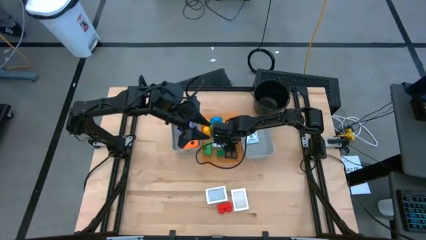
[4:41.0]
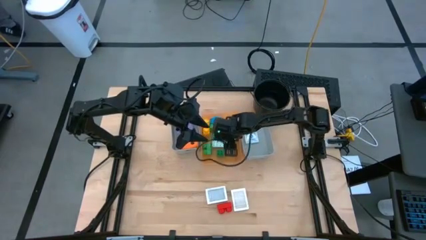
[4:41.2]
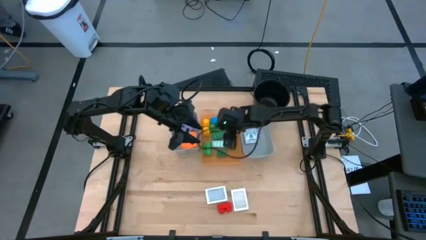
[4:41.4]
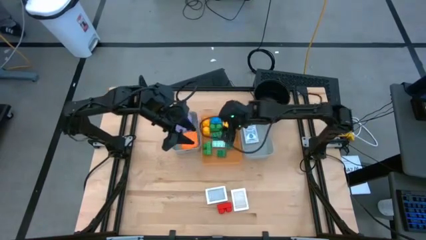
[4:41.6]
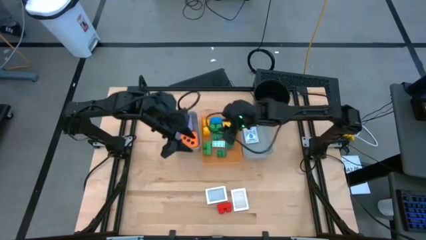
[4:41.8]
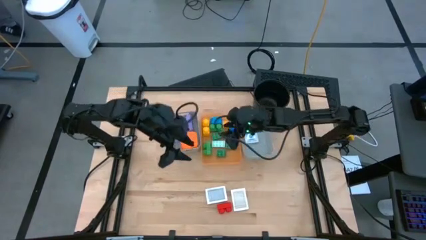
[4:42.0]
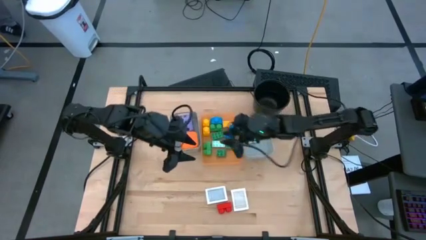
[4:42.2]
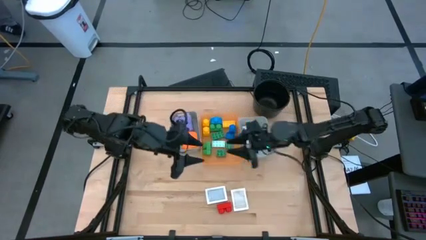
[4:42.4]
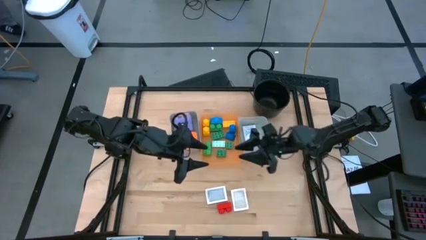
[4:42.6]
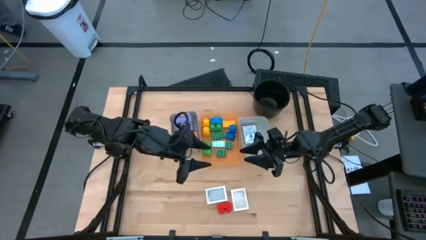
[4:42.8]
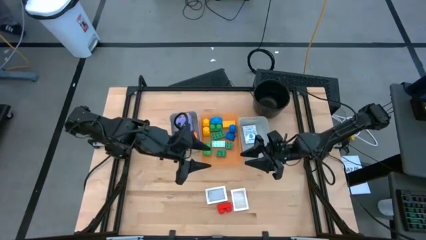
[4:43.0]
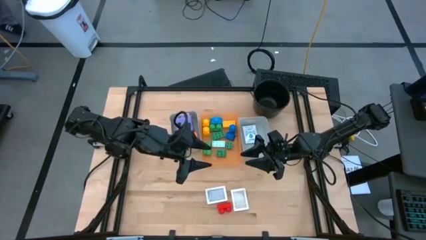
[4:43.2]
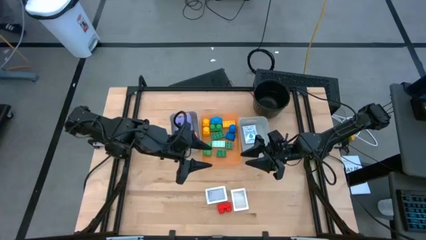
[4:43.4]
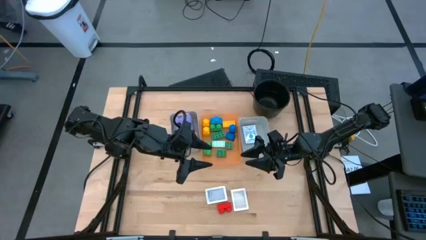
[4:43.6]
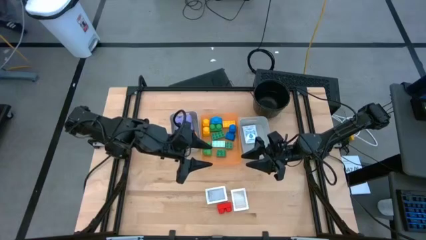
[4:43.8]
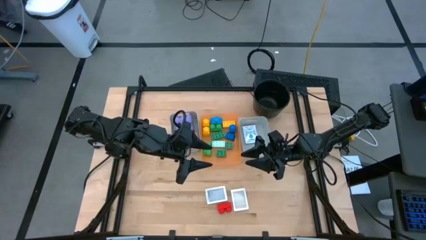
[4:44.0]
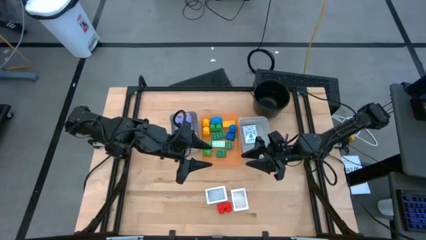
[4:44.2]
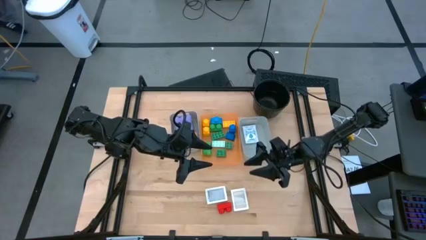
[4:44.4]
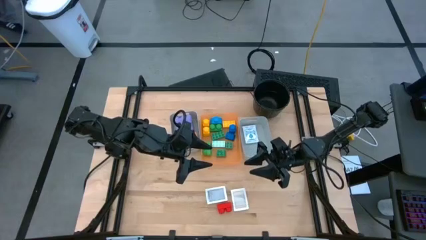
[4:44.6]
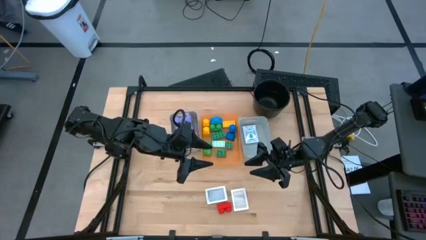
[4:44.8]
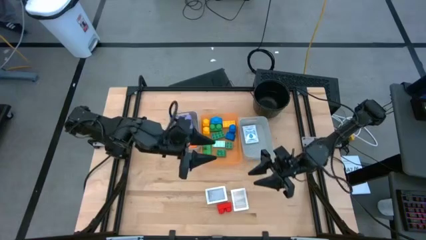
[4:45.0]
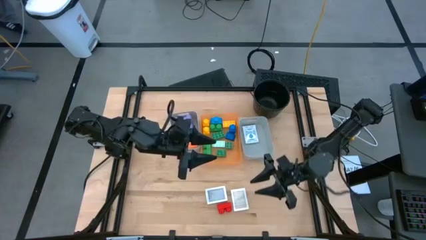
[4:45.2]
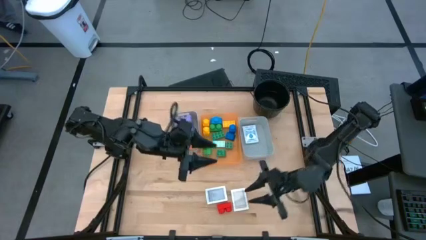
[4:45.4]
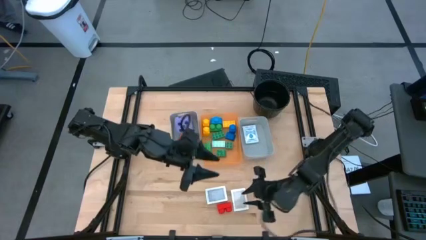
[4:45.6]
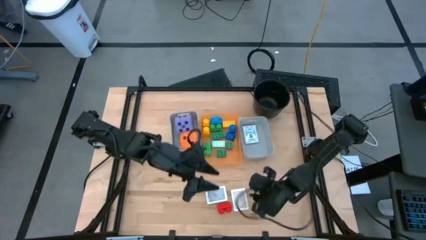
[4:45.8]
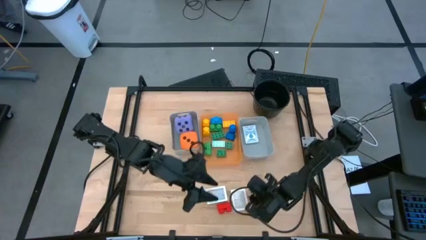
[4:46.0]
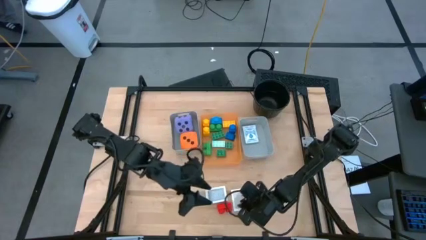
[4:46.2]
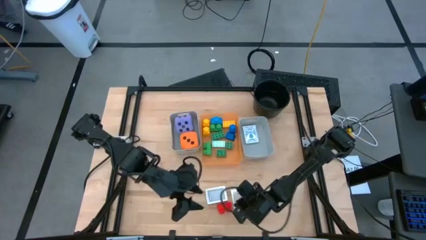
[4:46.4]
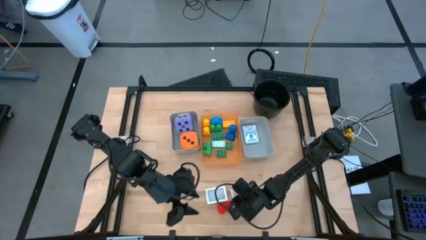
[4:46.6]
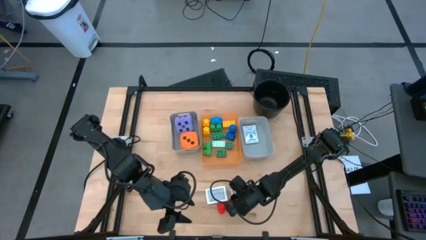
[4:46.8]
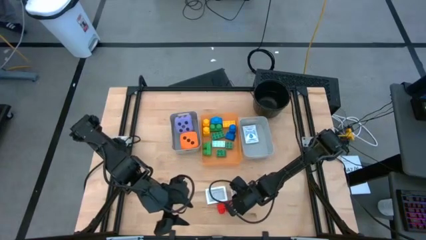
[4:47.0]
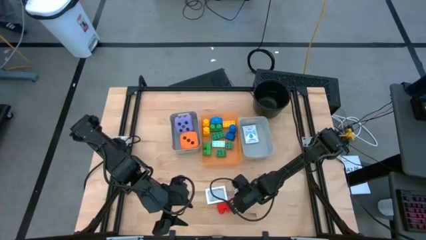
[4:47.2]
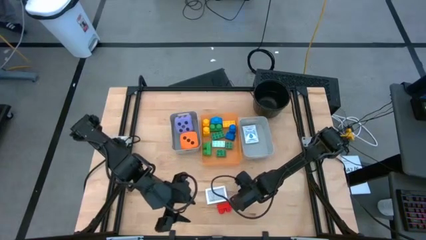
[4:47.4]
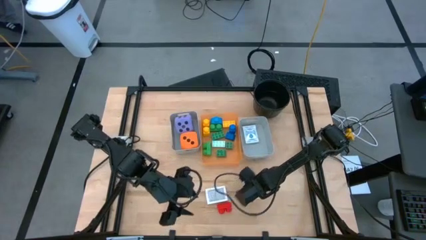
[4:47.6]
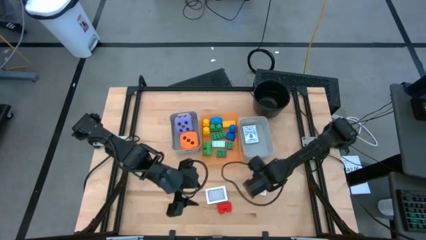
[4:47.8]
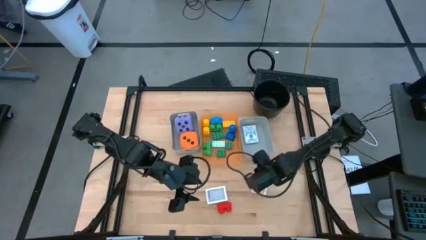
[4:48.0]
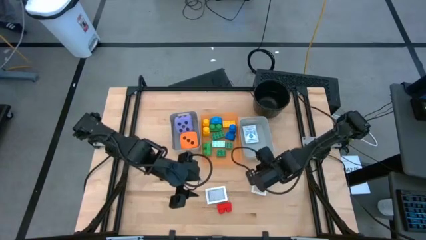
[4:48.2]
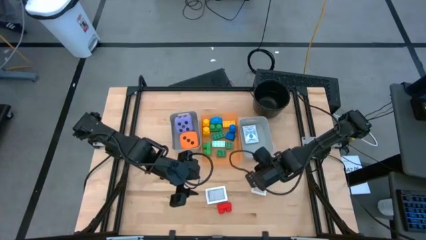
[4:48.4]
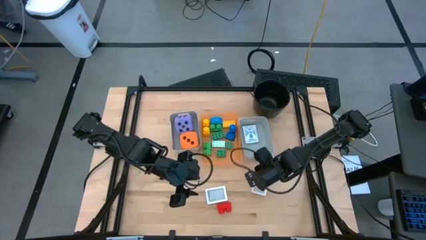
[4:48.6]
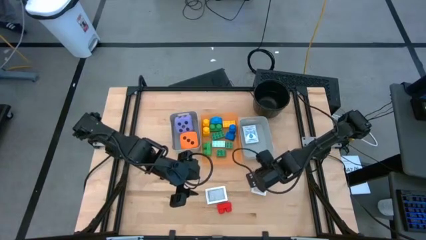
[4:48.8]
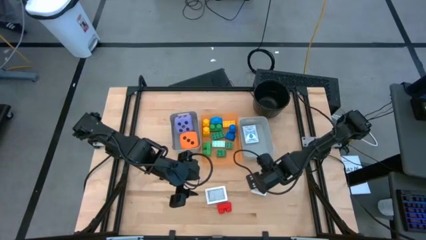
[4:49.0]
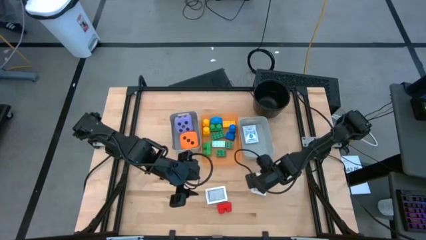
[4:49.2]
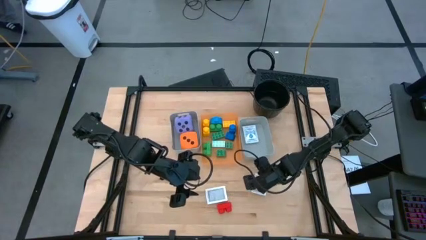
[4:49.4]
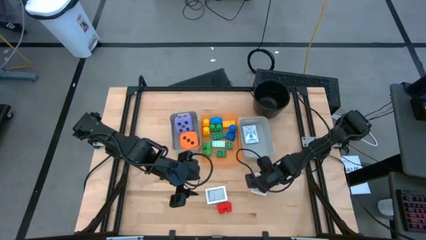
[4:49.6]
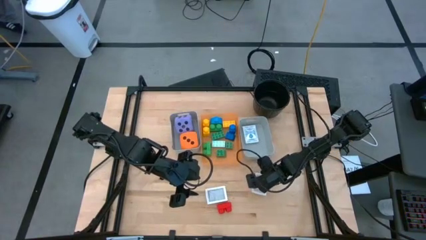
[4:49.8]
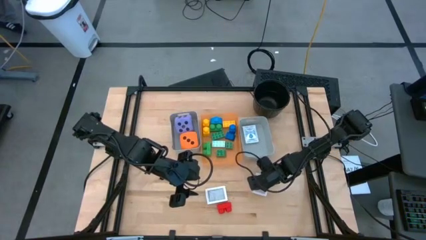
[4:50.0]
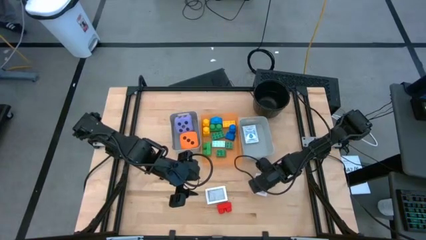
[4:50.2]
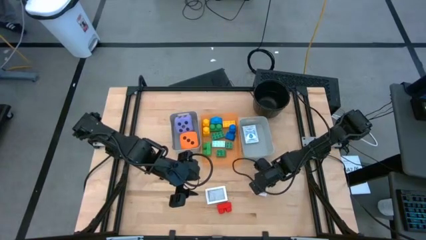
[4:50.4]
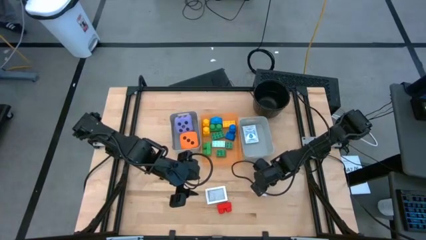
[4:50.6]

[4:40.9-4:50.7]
Task: Pick & Place Toys
Put the brown deck of cards into the right gray bin

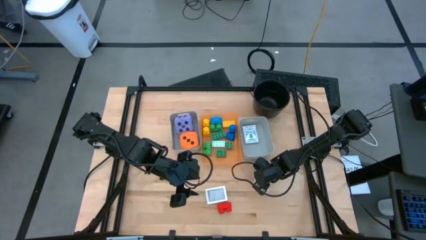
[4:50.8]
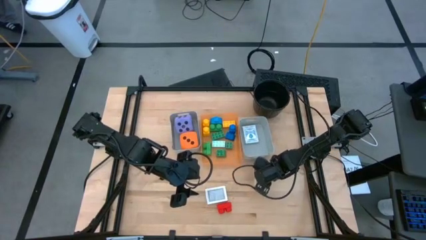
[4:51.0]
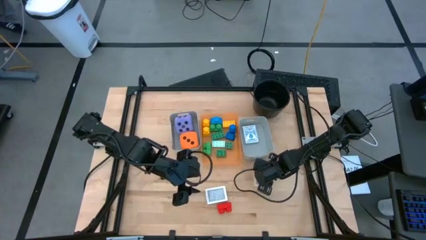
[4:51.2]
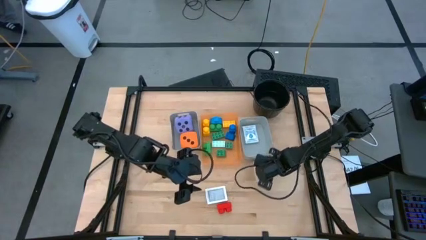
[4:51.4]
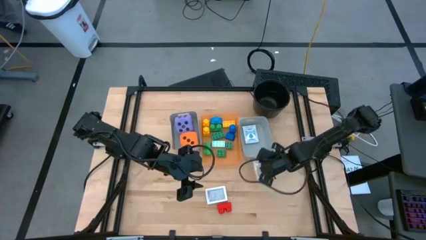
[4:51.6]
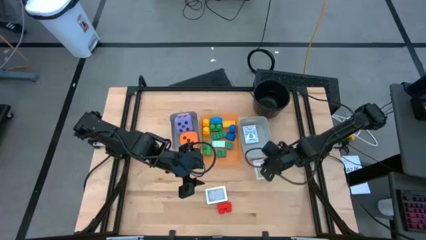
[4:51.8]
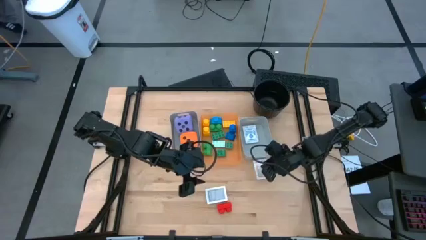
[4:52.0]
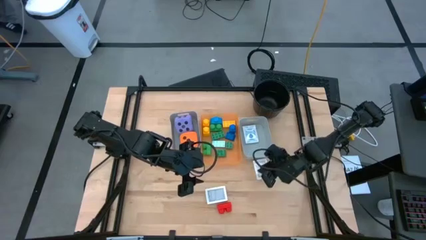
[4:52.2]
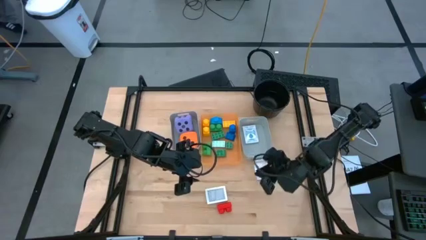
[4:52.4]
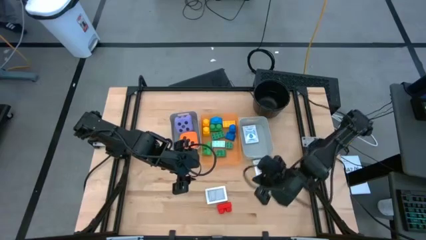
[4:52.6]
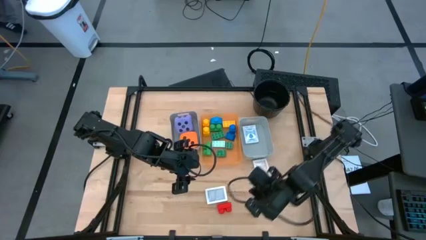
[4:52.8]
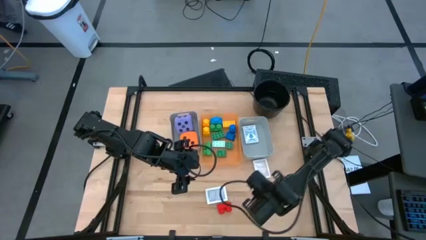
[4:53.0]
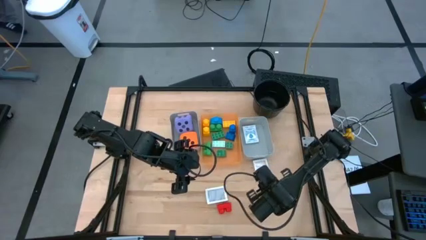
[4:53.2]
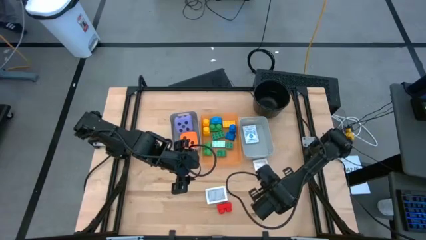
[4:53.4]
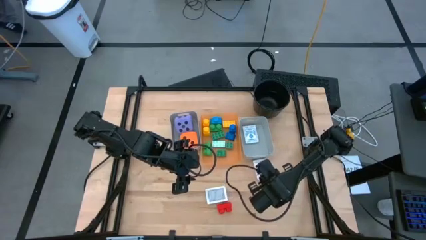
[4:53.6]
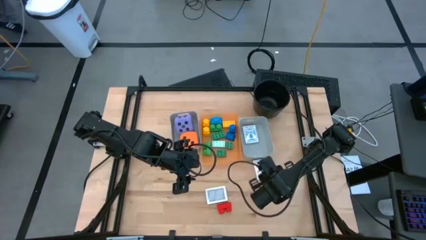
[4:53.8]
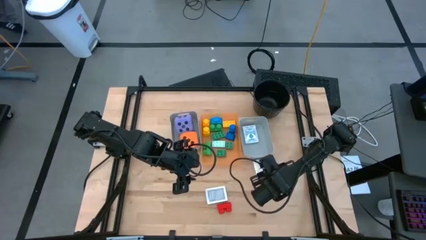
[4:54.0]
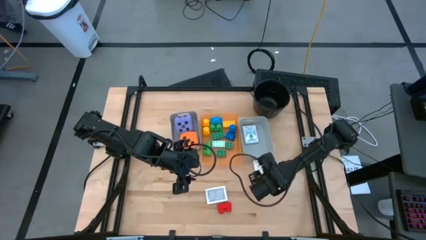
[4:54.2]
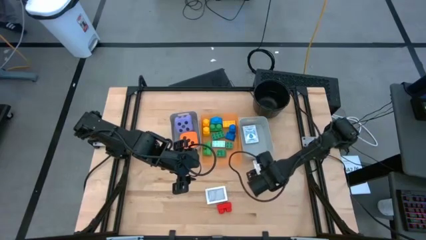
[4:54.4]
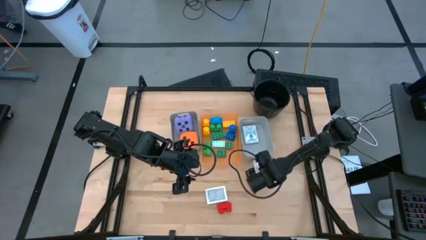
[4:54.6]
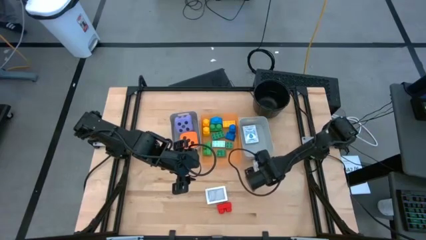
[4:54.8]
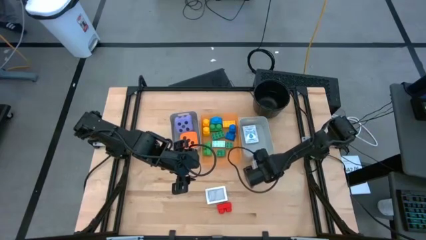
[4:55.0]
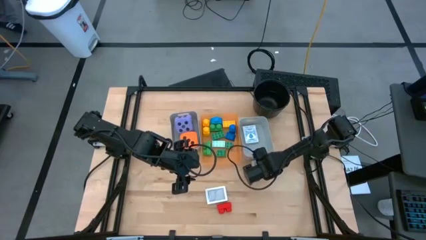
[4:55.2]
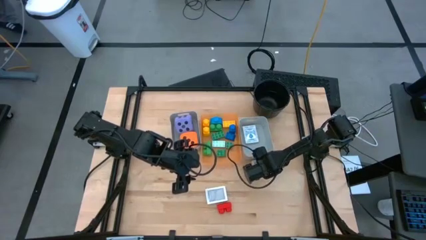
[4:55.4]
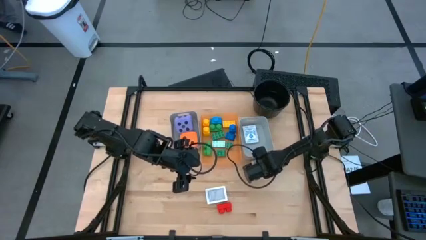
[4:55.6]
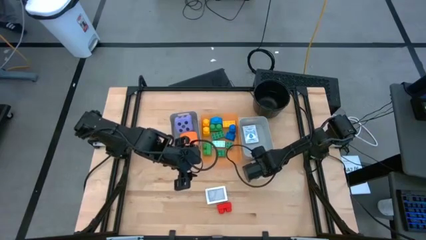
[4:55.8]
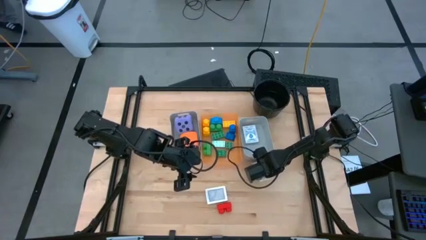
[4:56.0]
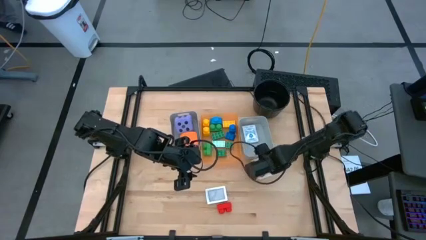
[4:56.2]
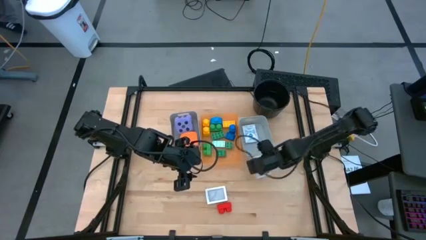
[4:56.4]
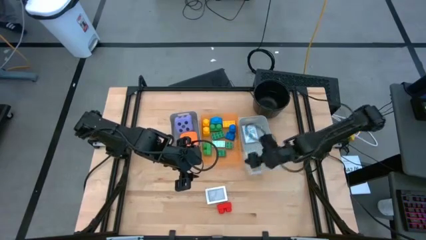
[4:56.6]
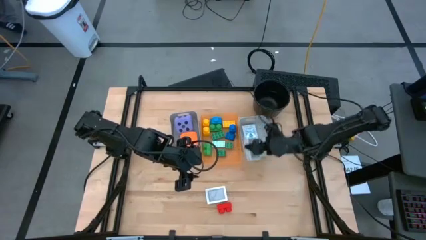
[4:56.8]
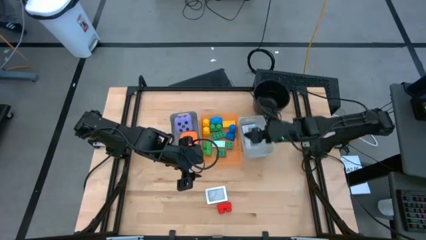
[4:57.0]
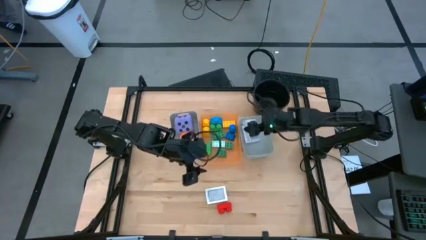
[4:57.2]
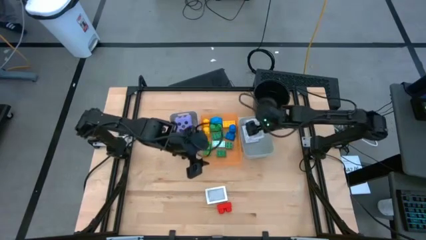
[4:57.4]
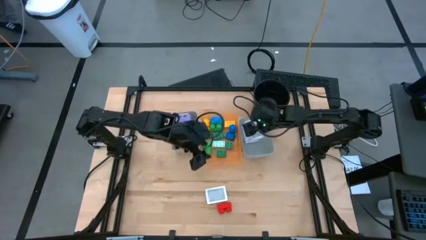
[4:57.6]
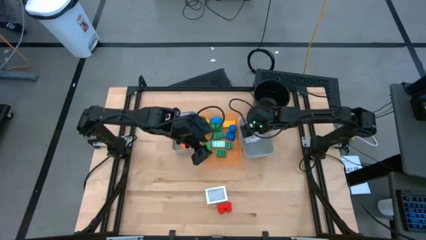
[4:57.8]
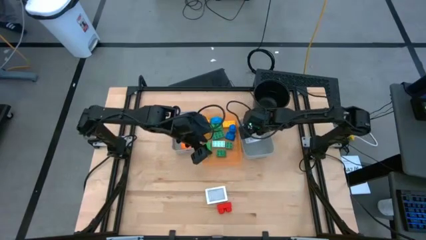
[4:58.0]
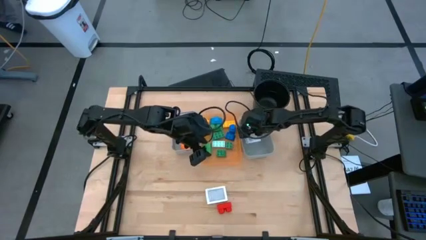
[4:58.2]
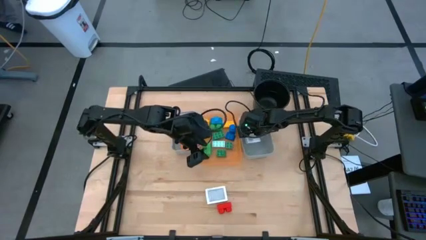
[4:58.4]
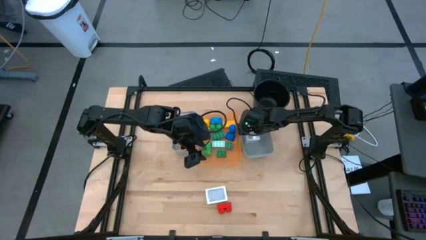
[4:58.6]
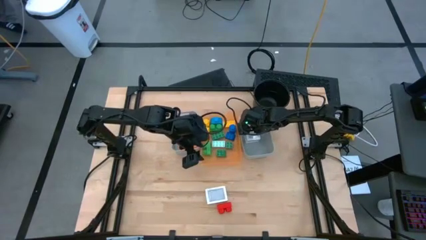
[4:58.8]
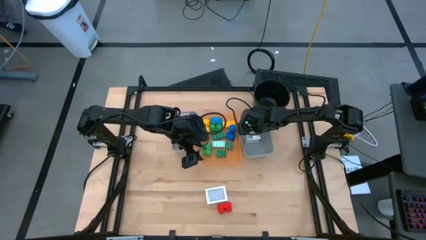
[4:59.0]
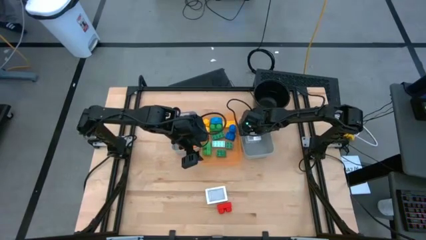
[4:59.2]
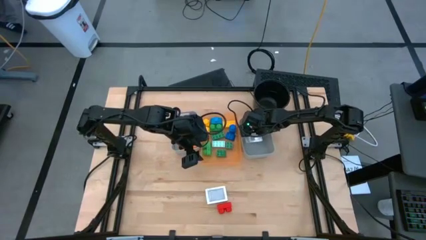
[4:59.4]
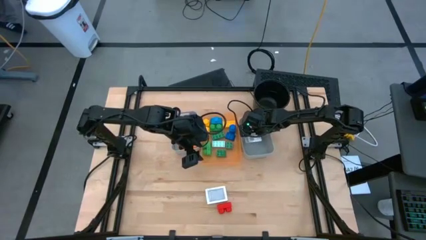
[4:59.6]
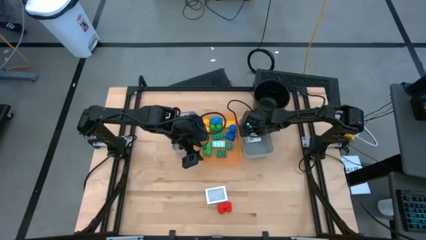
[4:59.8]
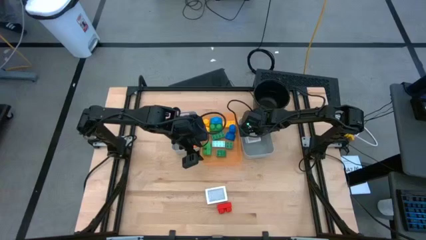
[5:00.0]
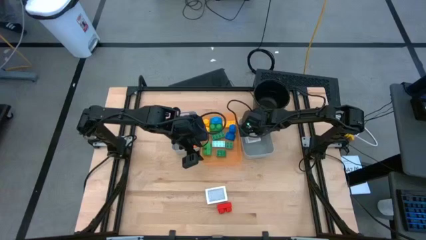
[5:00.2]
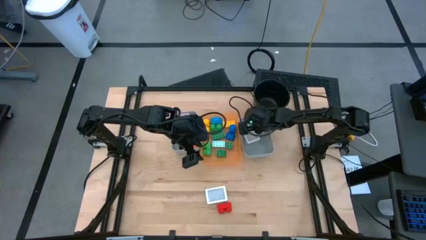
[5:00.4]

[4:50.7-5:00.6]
Put the brown deck of cards into the right gray bin
